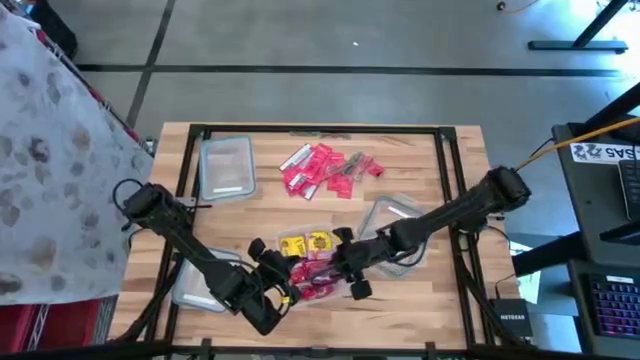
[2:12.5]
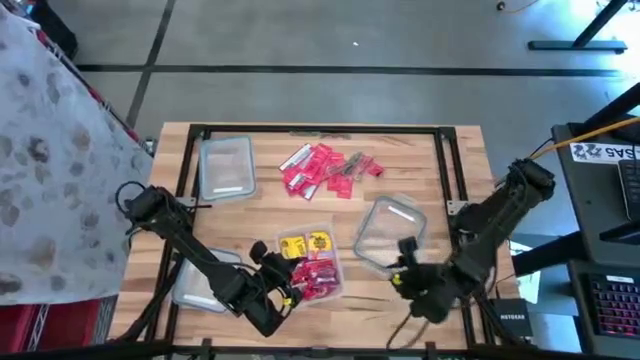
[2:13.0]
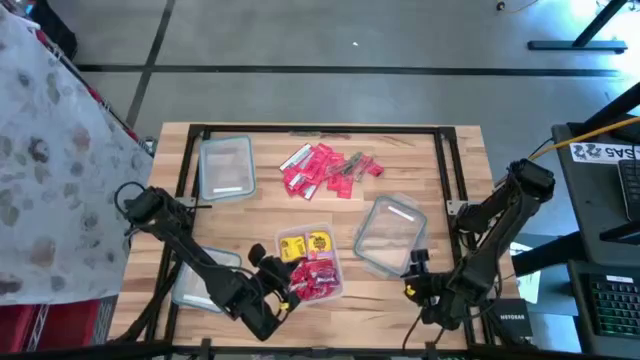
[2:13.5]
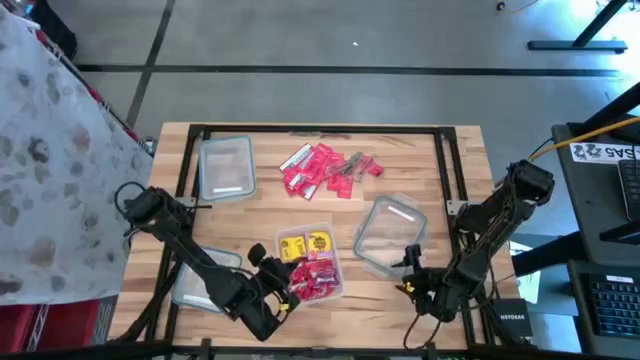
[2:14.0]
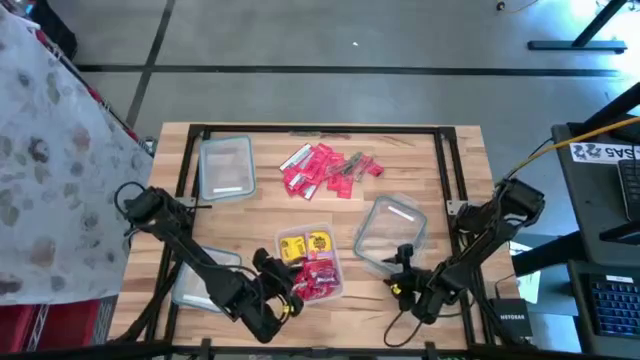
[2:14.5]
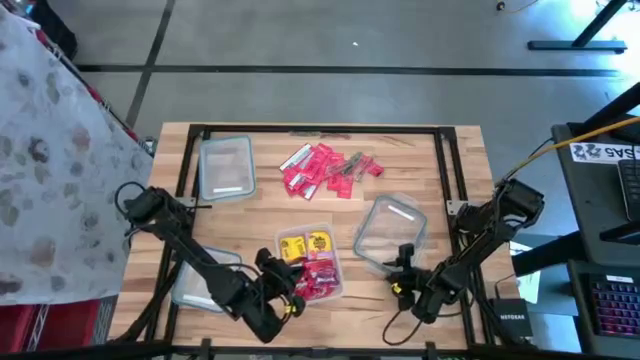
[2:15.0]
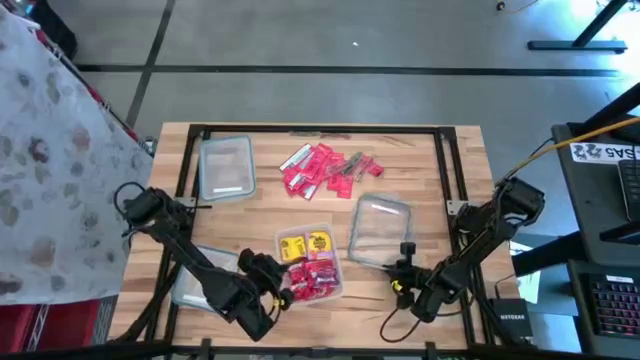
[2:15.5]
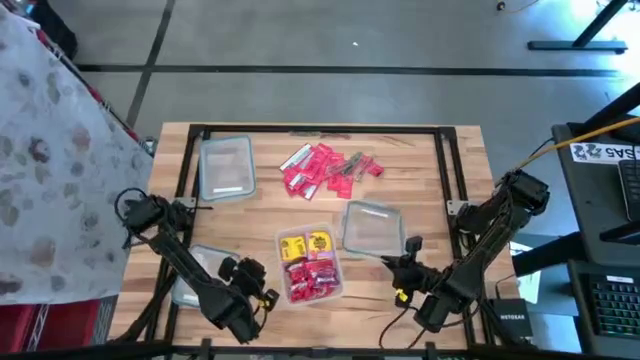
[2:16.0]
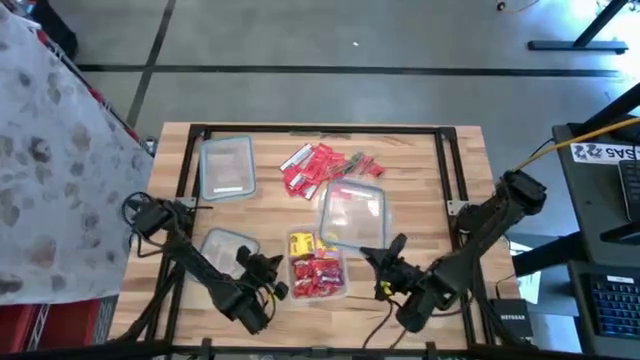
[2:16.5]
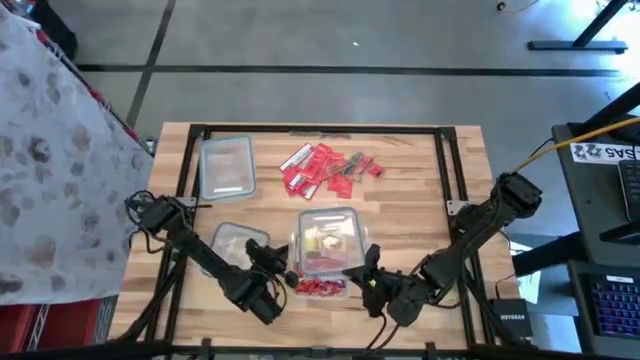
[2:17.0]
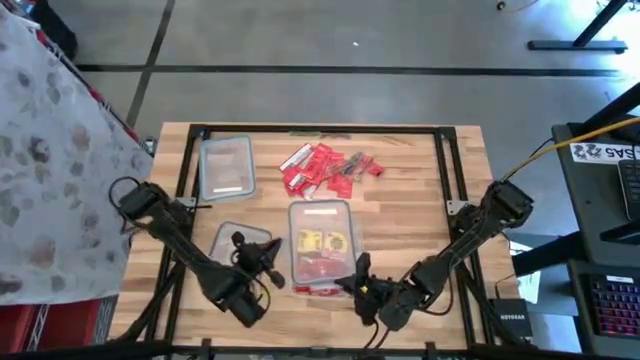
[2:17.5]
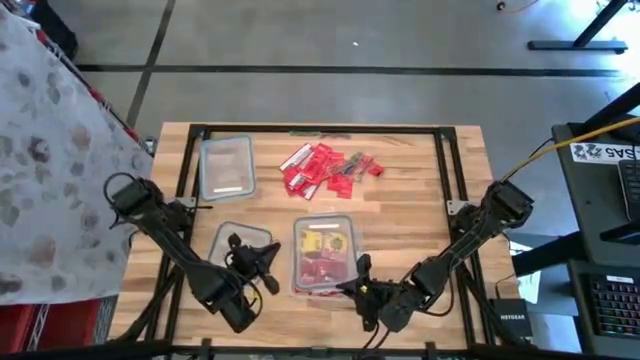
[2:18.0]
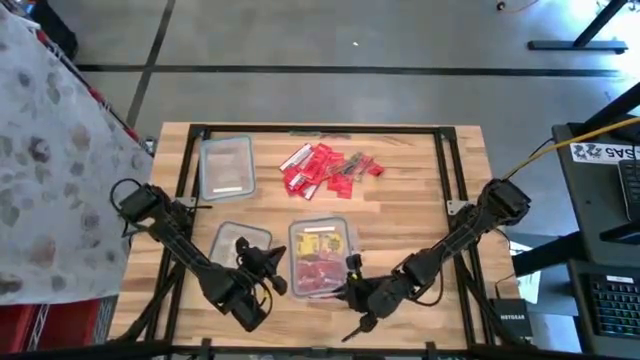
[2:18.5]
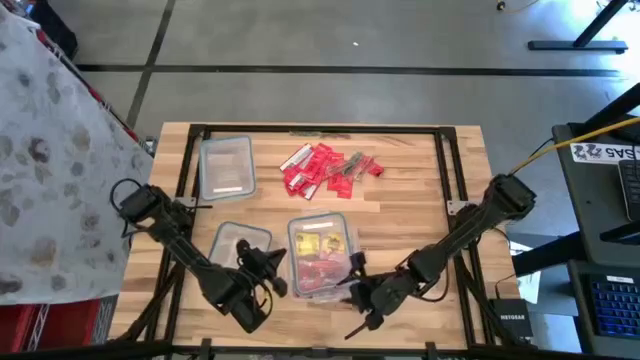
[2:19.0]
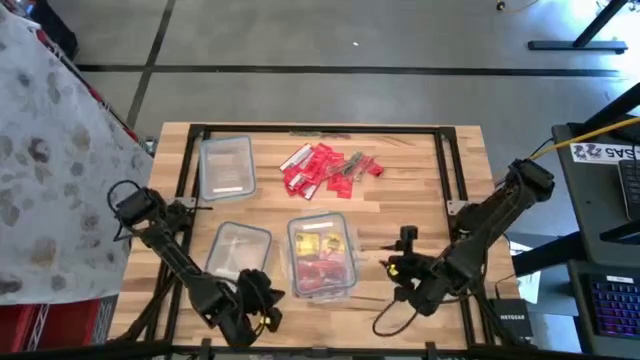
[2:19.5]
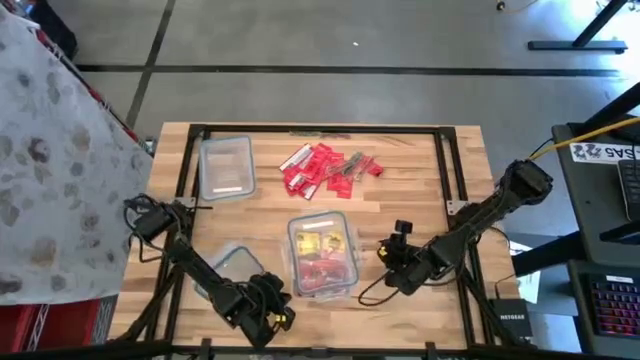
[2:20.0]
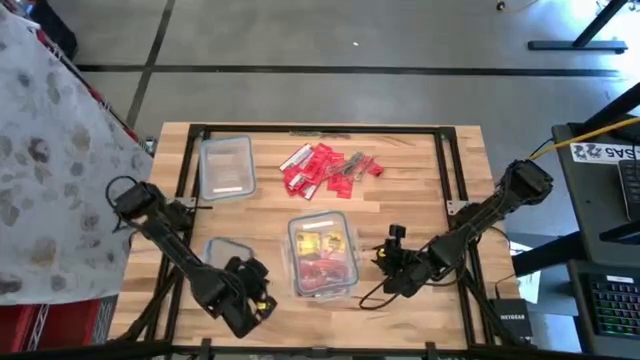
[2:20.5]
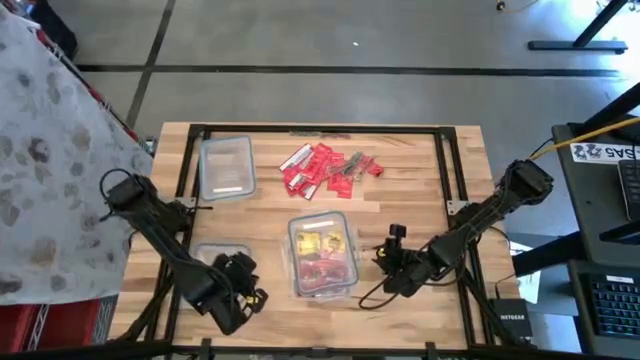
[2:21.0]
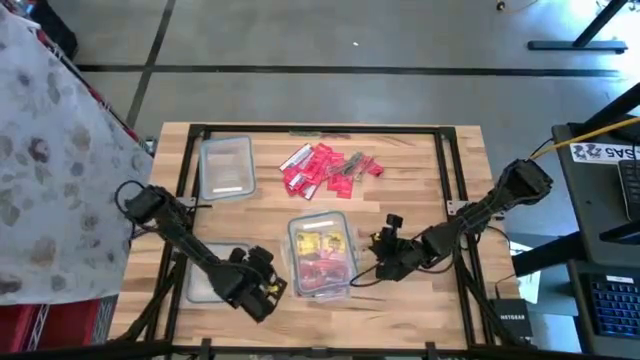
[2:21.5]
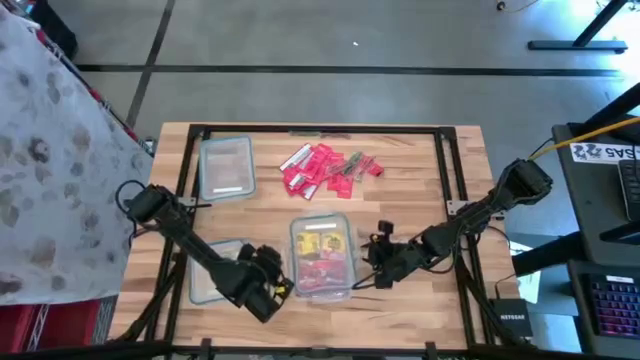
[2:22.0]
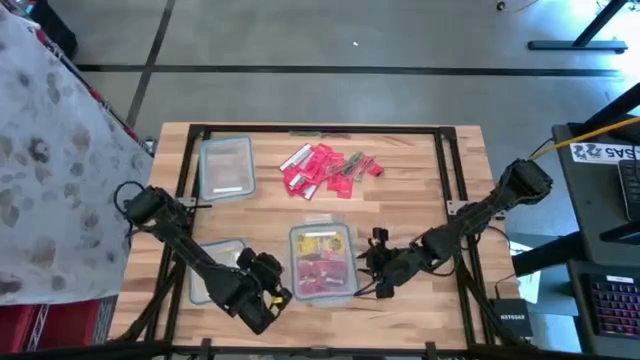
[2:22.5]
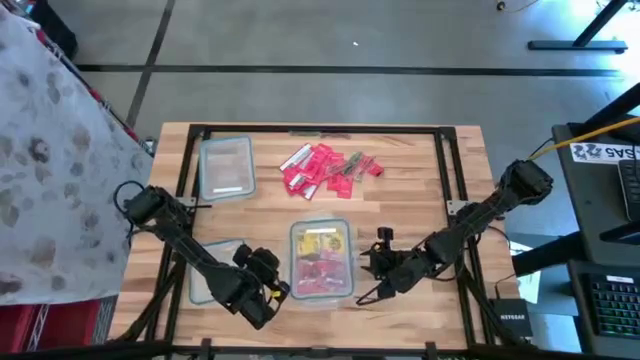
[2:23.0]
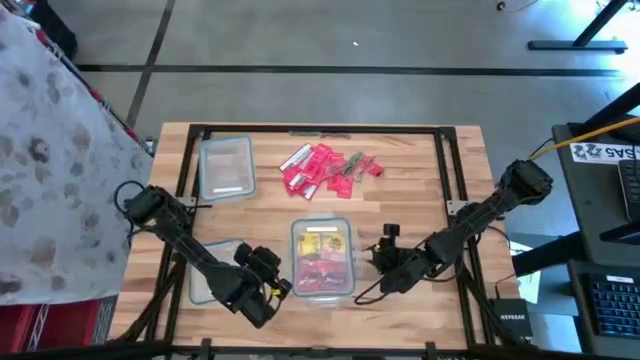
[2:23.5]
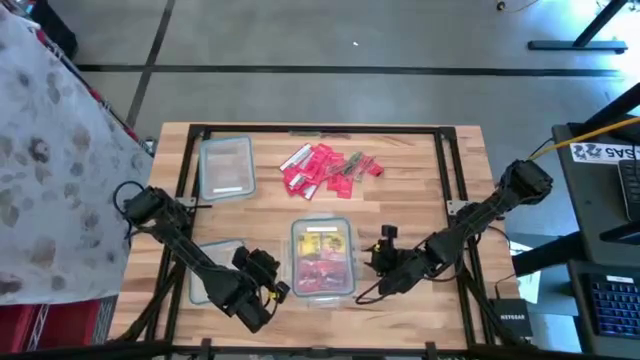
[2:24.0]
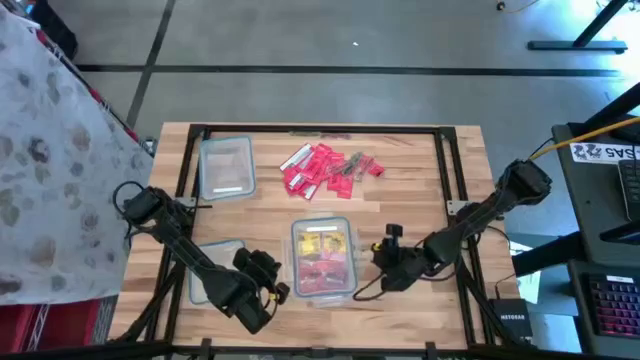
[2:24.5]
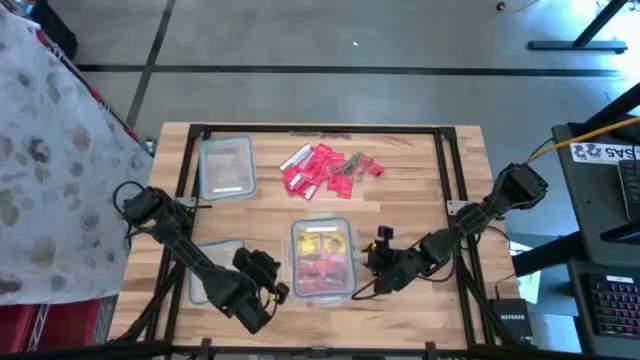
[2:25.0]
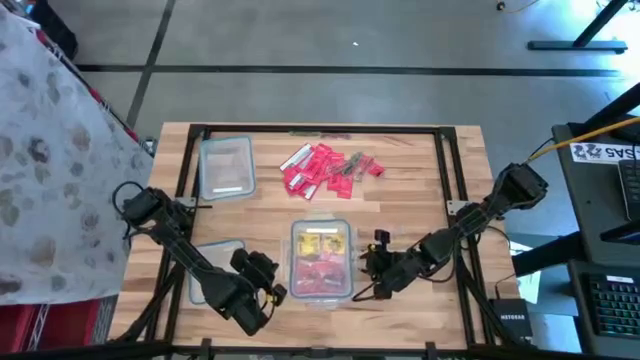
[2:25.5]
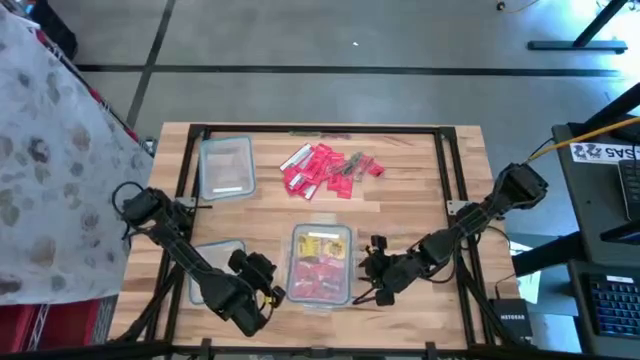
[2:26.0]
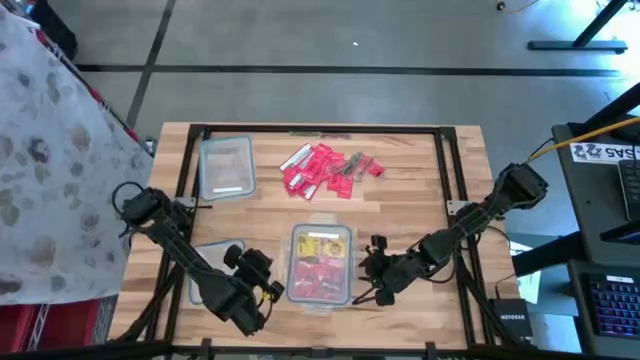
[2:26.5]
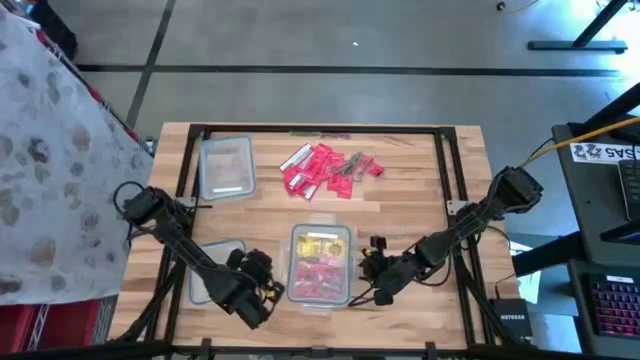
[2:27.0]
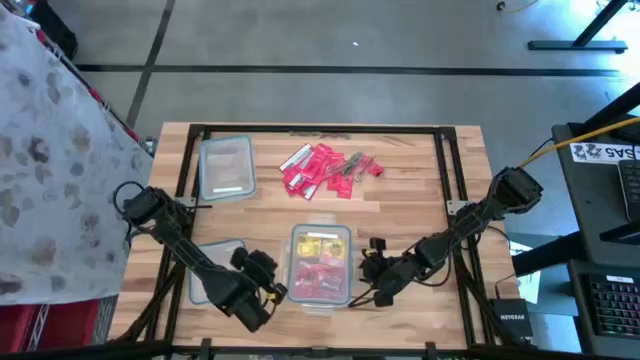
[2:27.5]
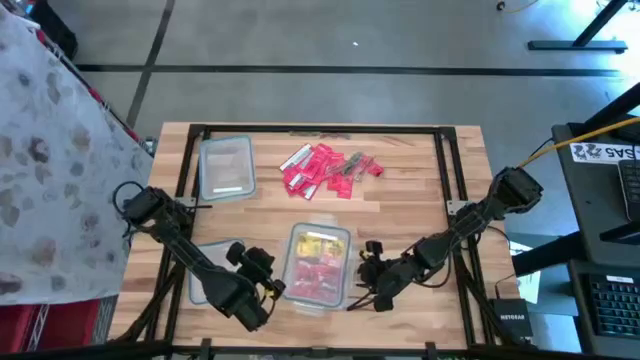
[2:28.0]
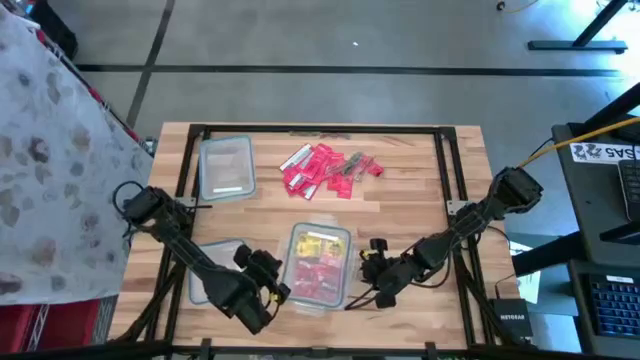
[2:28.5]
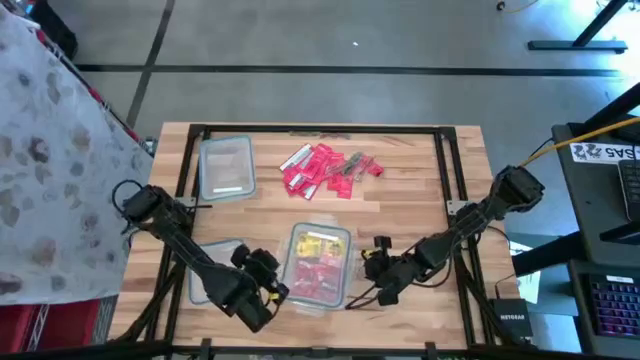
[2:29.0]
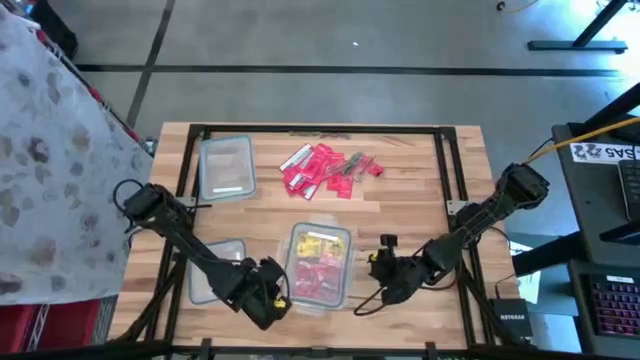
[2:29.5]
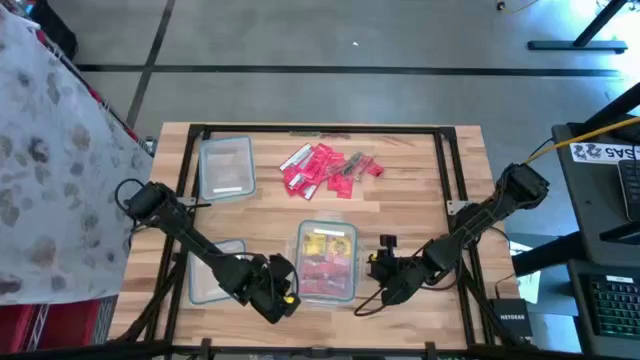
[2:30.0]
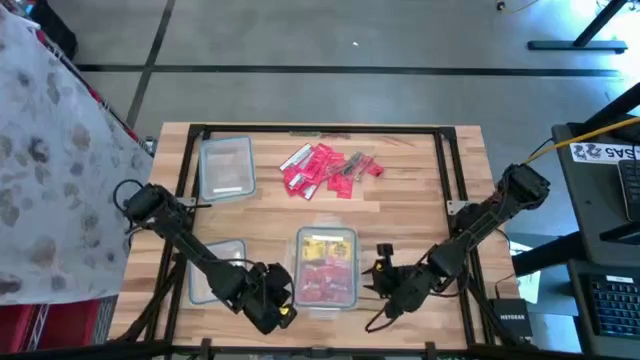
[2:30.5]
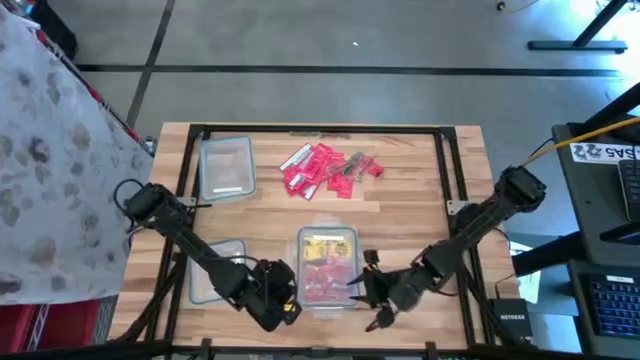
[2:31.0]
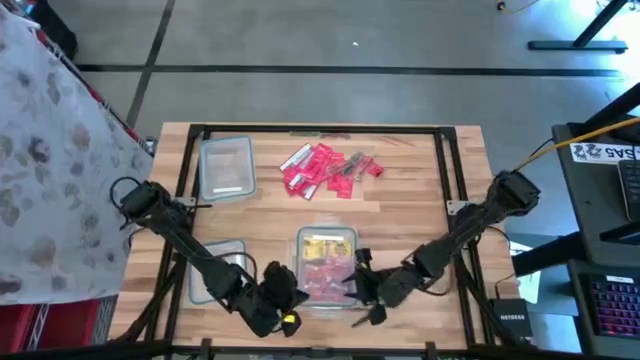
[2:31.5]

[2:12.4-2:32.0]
Task: Sort candy
Close the right transparent bin

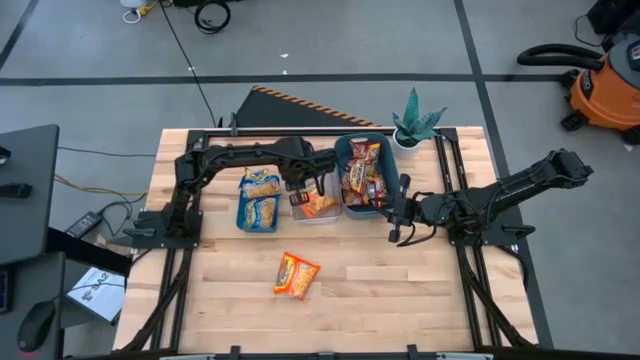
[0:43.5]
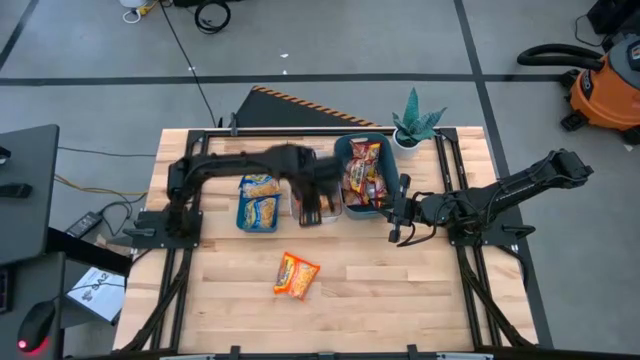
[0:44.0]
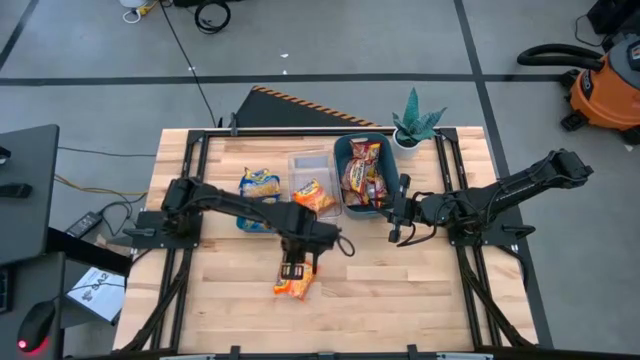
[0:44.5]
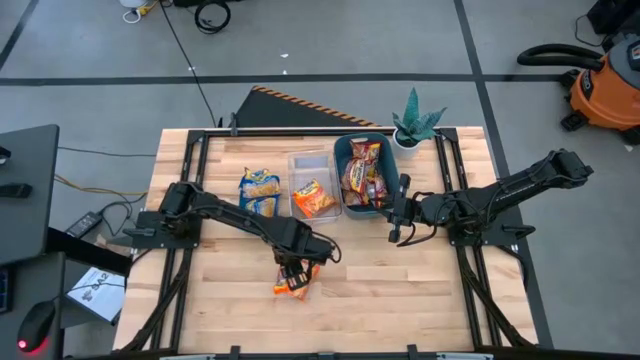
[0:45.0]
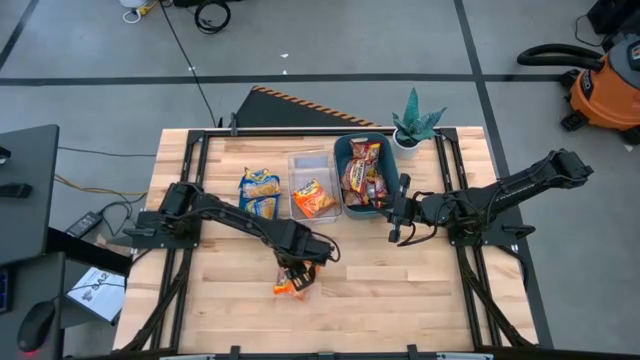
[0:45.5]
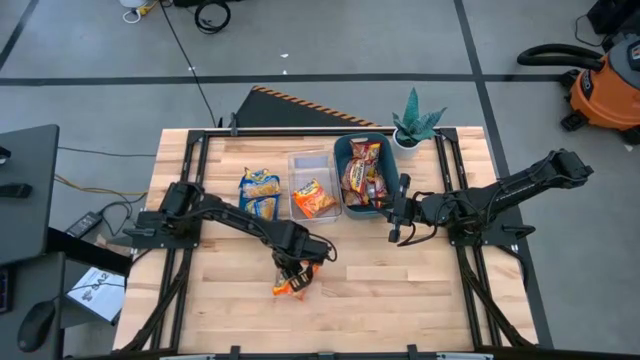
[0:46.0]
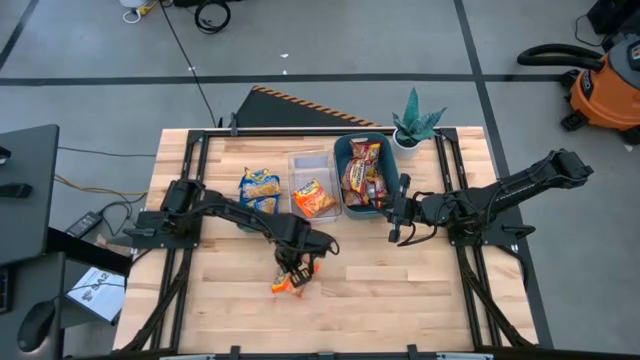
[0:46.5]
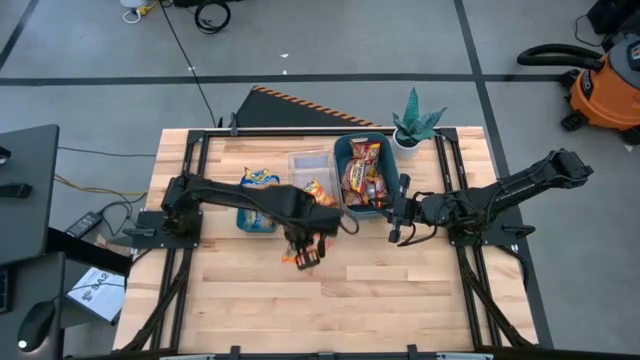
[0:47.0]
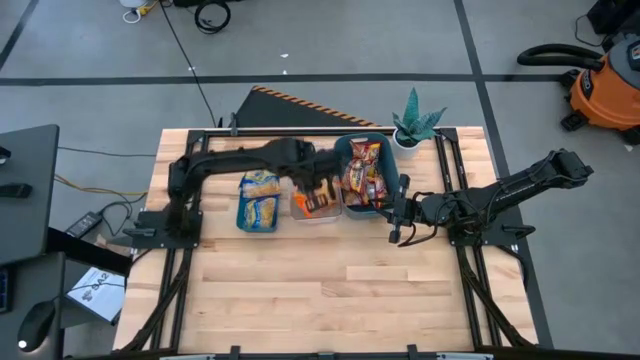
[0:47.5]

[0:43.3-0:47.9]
Task: Sort Maruchan noodles
Put the orange noodle pack into the transparent bin
